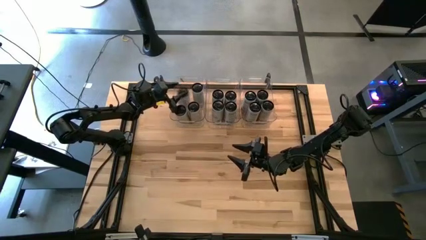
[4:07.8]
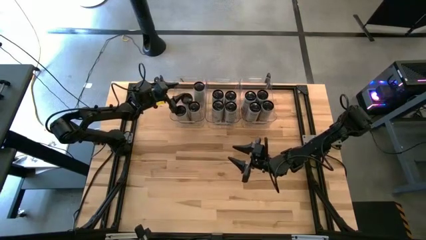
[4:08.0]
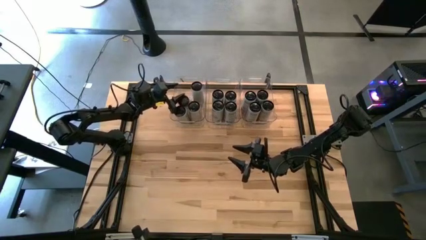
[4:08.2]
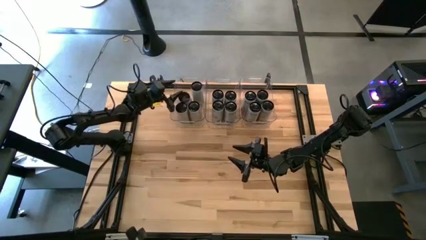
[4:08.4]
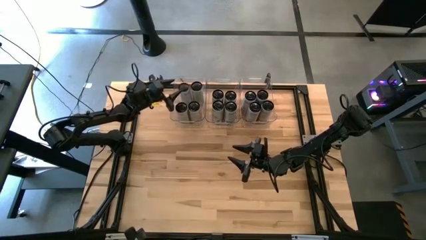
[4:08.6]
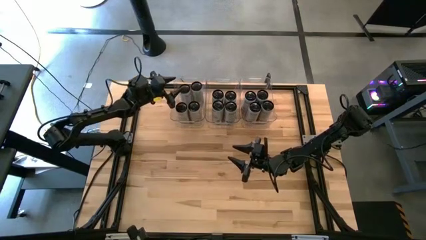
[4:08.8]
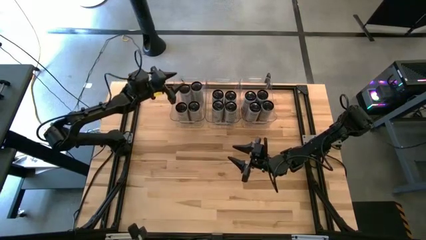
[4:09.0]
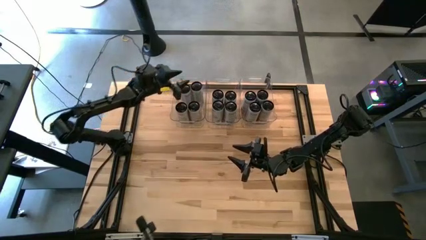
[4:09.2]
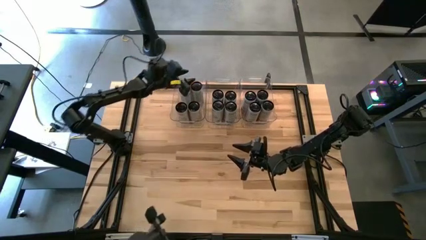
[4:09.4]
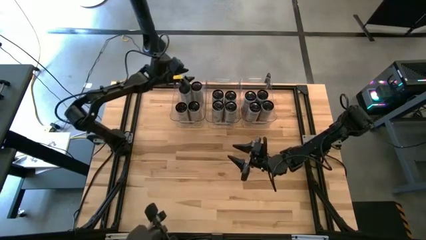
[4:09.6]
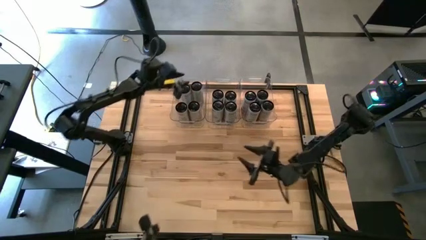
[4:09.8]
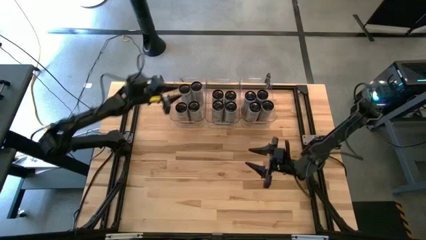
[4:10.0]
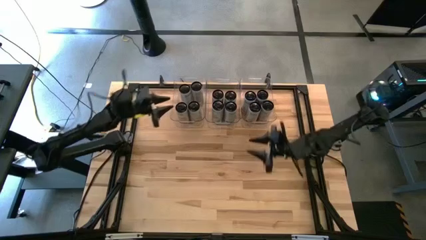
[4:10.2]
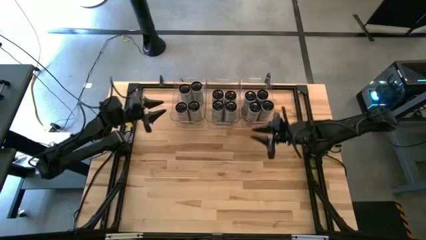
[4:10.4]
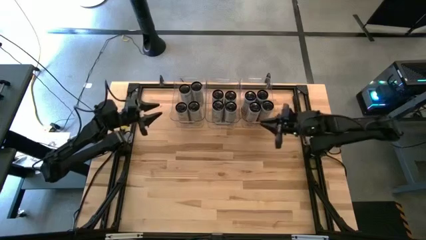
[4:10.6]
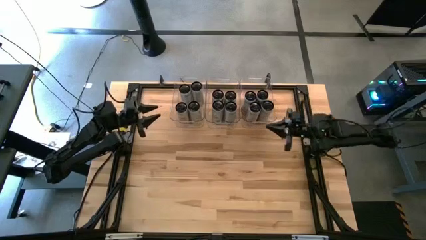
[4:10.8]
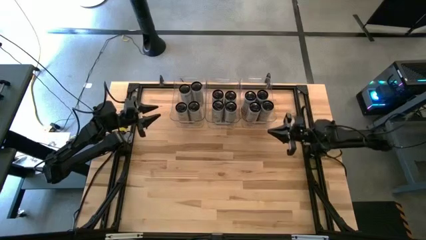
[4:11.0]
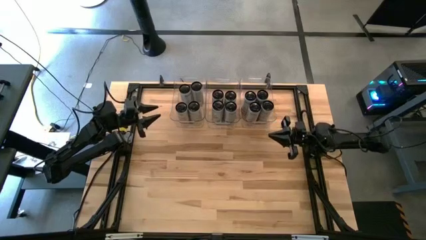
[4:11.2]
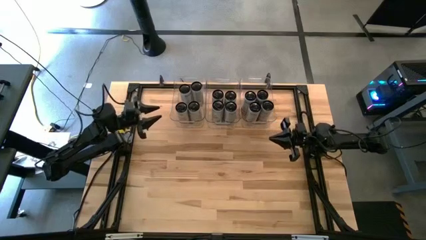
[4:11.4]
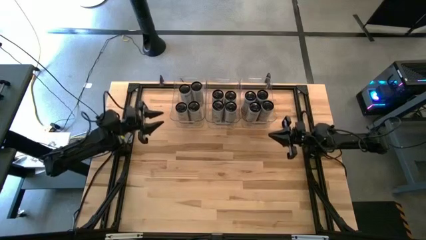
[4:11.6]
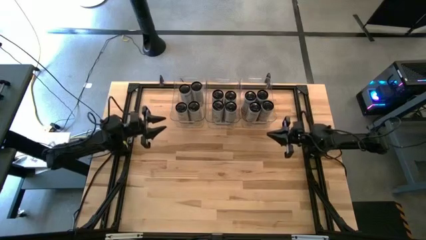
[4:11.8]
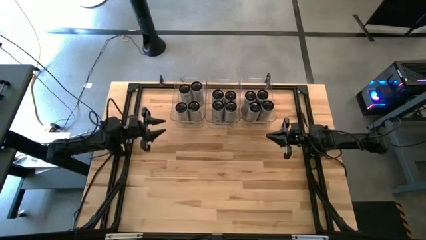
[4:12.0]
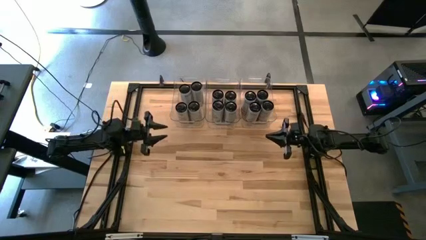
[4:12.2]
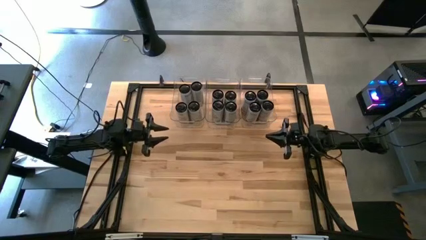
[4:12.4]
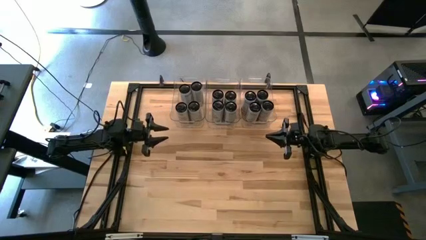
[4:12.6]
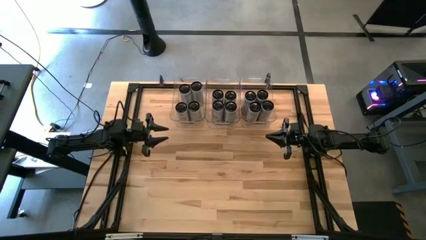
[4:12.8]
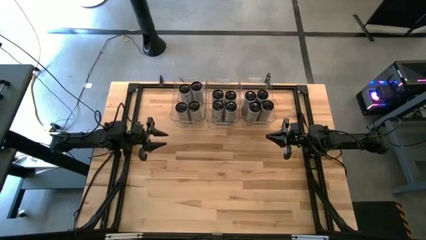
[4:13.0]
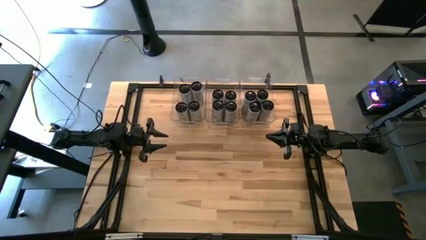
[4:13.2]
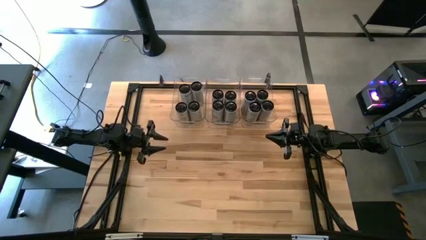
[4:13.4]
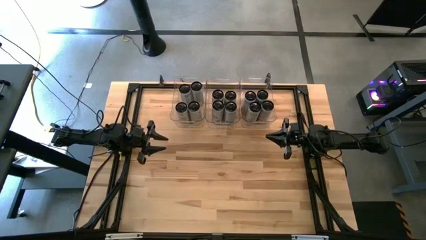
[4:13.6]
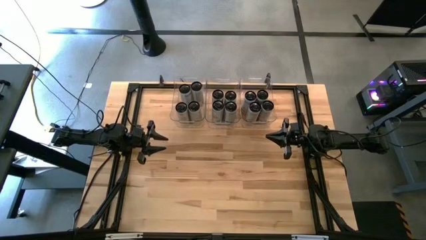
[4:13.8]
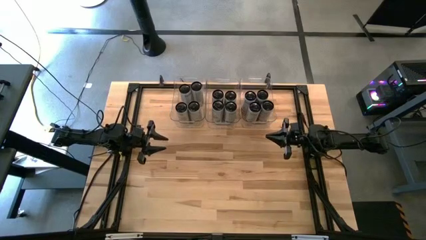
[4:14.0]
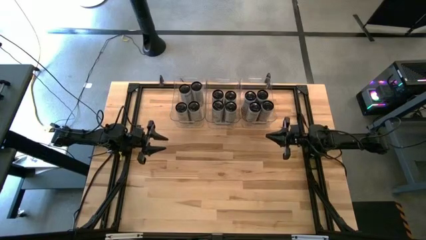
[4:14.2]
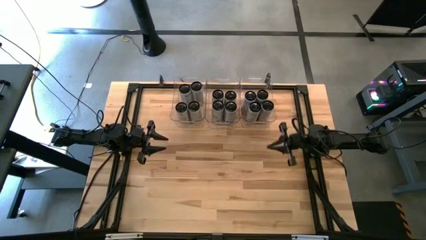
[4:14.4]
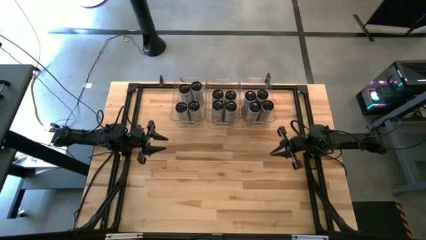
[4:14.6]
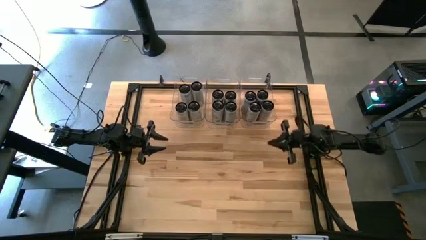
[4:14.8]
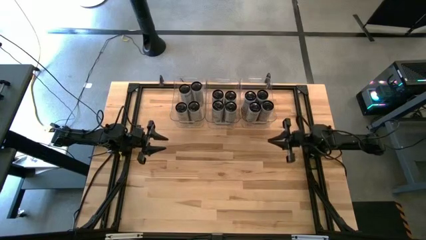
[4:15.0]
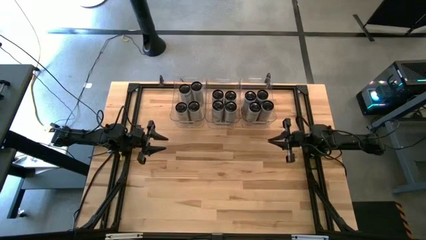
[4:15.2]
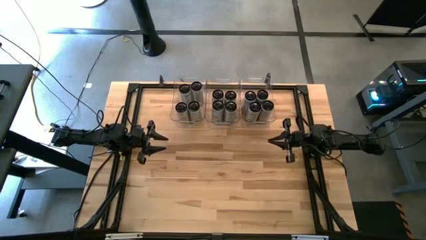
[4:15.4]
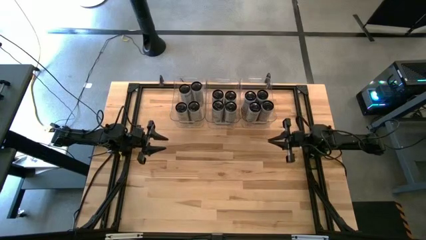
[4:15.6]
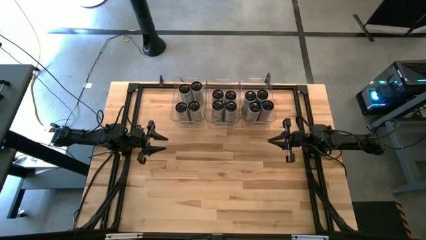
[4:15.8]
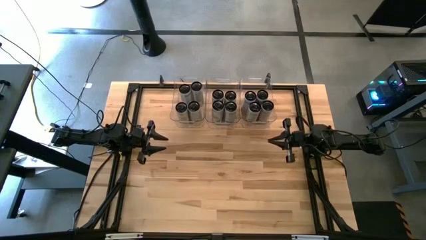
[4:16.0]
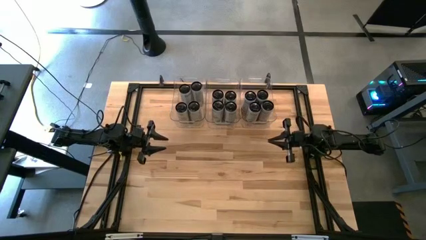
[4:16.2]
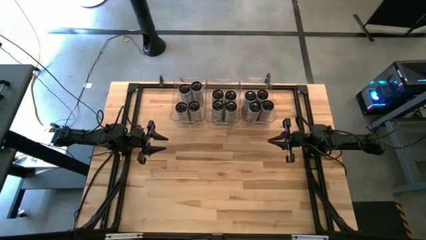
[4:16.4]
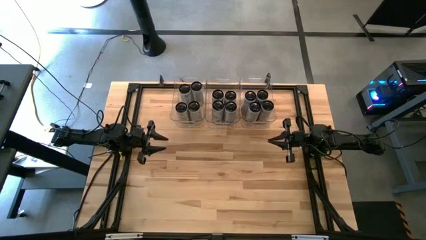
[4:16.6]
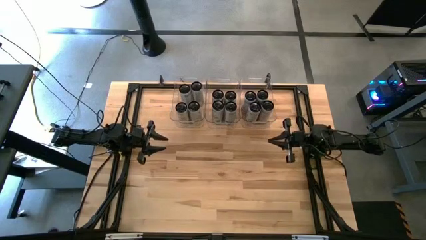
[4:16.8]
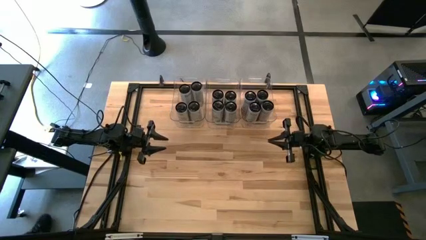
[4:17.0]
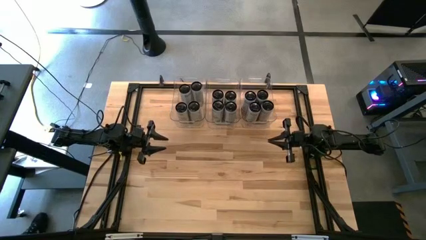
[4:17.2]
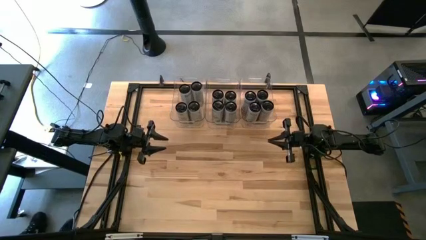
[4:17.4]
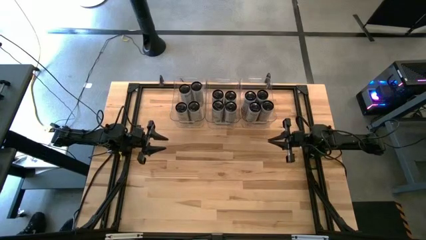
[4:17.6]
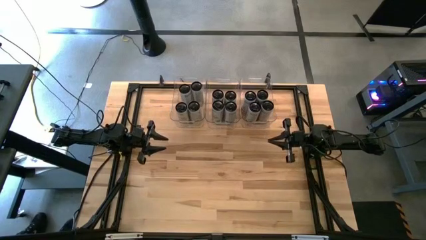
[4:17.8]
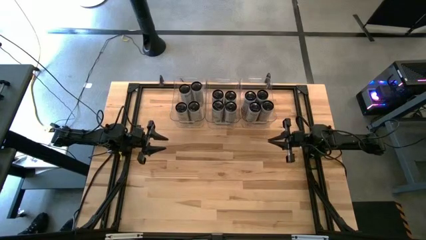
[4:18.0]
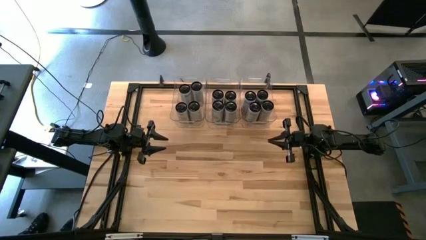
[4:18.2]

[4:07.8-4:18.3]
Task: Sort soda cans
Return to Home Position

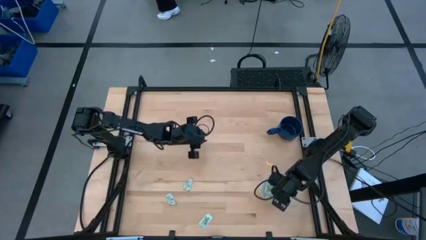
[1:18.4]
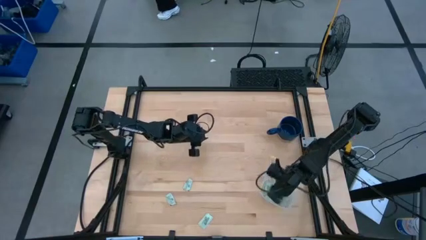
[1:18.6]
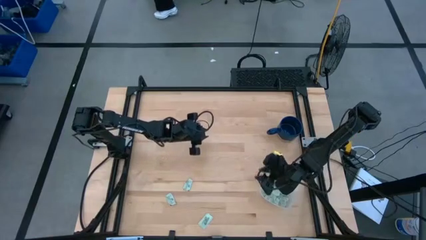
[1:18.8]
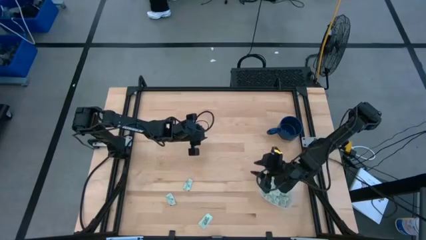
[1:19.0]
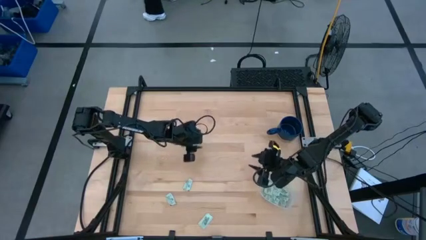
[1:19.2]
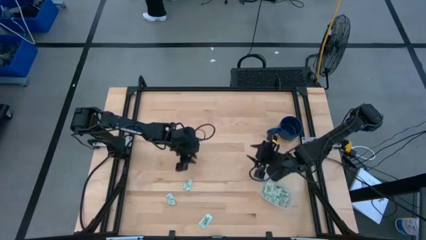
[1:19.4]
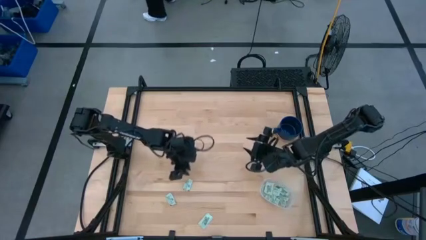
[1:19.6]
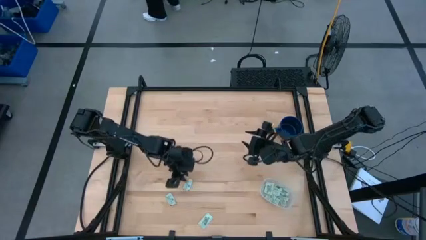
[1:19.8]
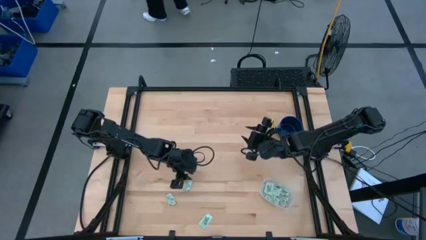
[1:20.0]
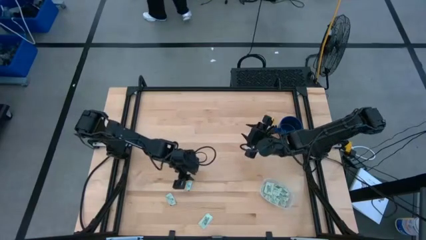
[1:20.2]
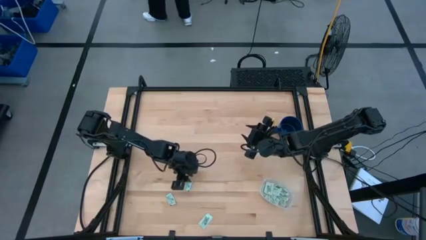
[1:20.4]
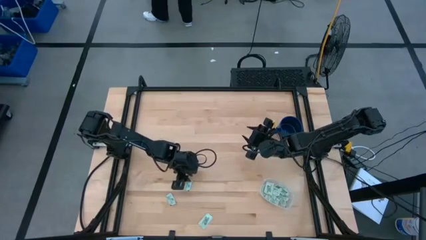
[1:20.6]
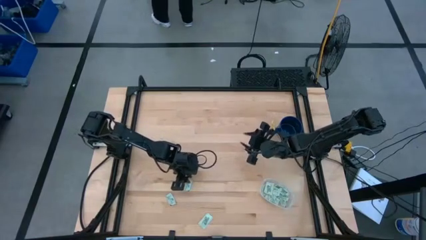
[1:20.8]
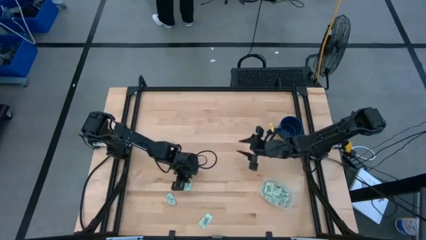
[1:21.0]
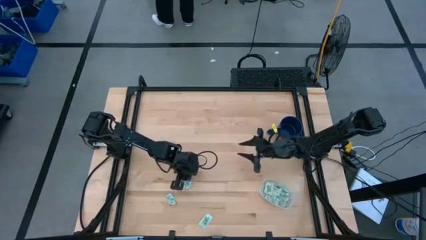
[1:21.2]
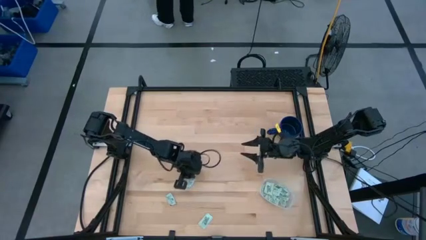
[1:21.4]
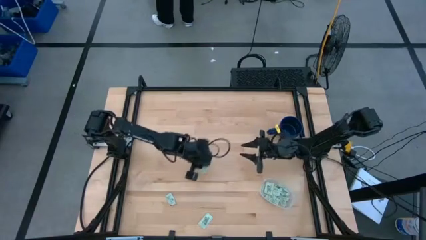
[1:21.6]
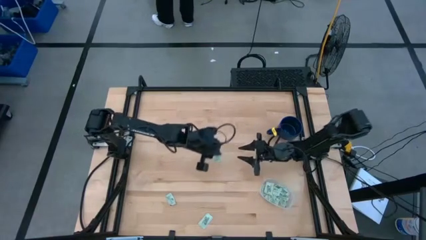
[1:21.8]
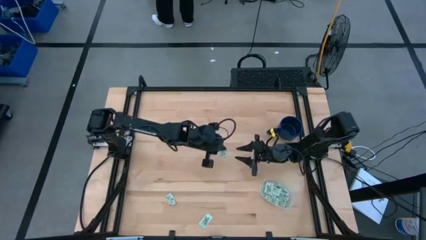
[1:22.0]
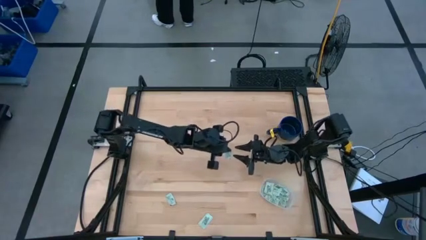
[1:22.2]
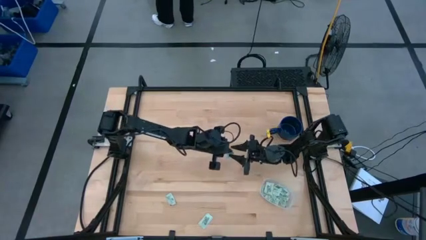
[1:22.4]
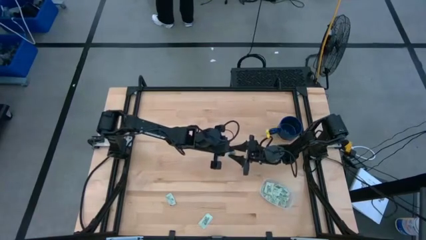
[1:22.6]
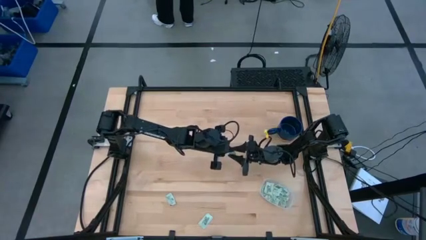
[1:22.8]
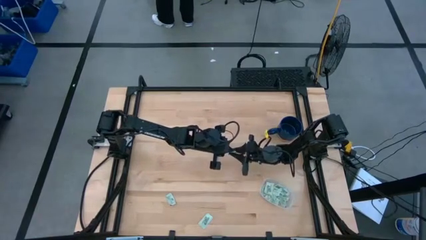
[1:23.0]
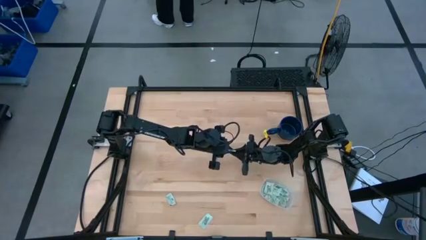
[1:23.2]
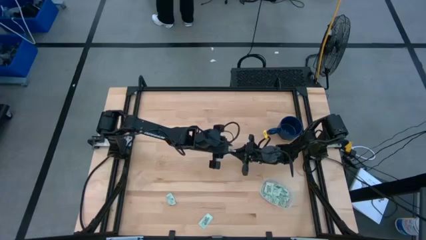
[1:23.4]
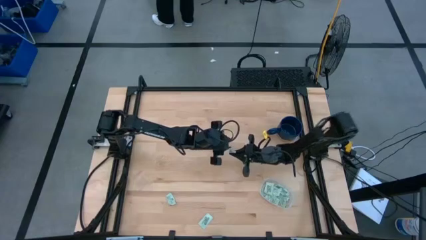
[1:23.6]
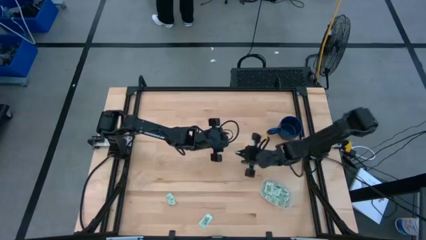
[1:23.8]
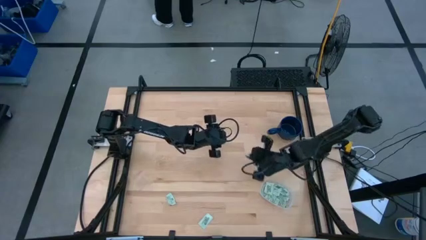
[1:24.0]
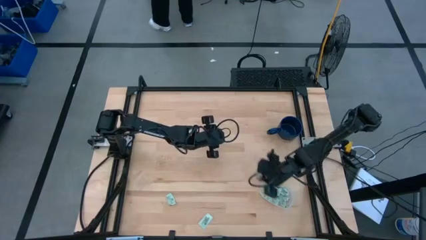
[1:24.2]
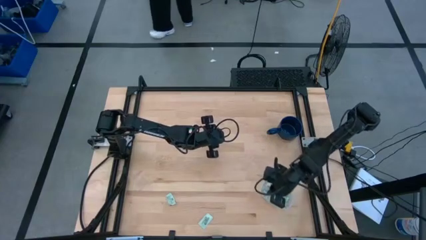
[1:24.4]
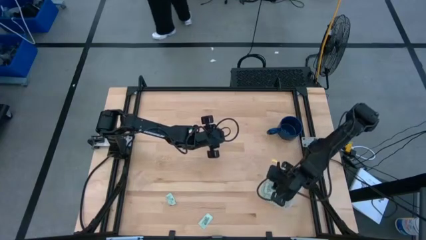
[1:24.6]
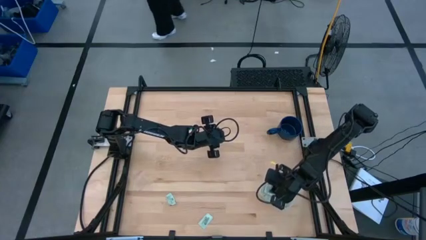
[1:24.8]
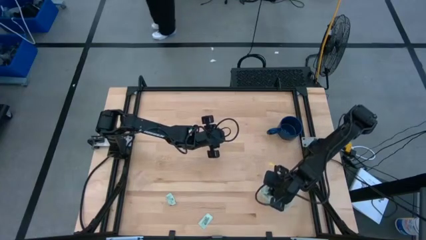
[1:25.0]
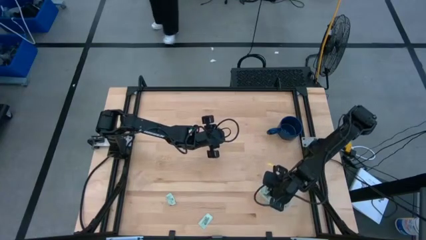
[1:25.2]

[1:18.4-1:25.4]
Task: Pick and place Stevia / Truvia into bins
Put the stevia packet into the transparent container
